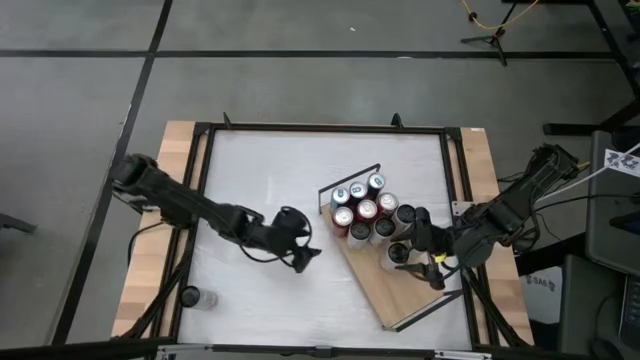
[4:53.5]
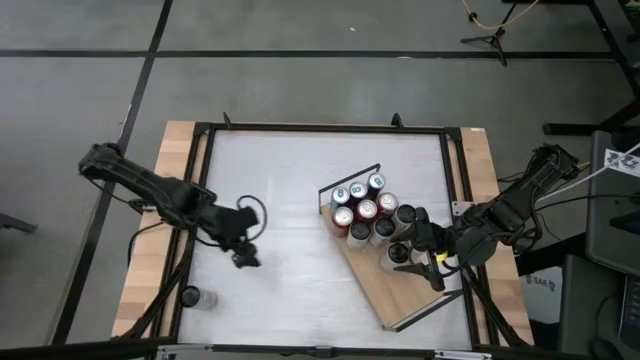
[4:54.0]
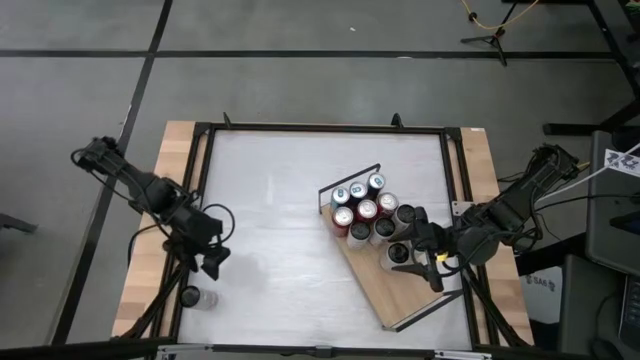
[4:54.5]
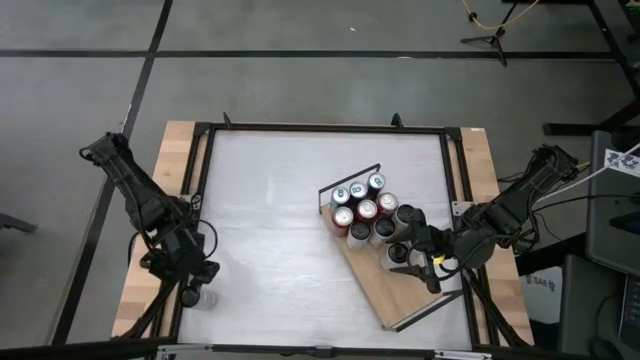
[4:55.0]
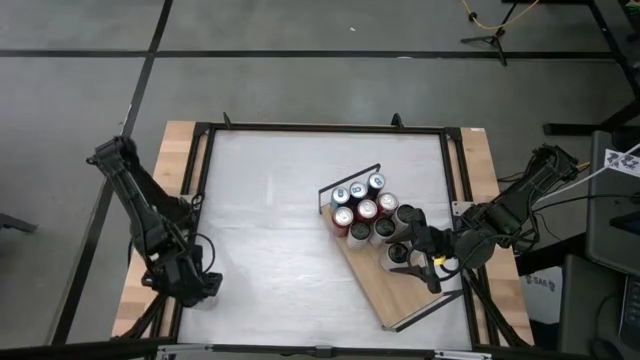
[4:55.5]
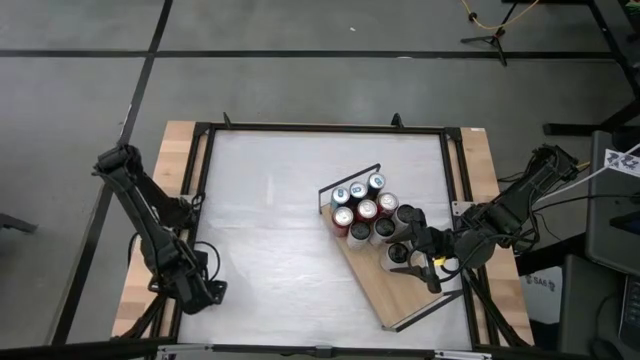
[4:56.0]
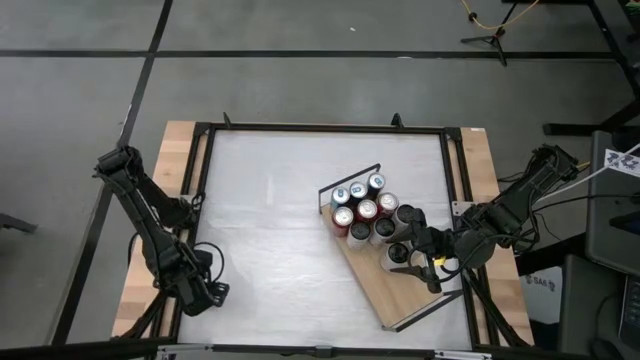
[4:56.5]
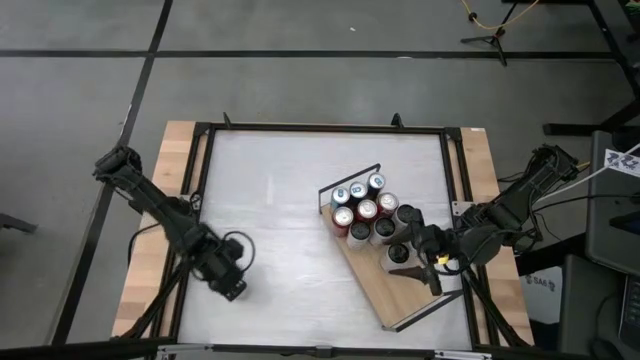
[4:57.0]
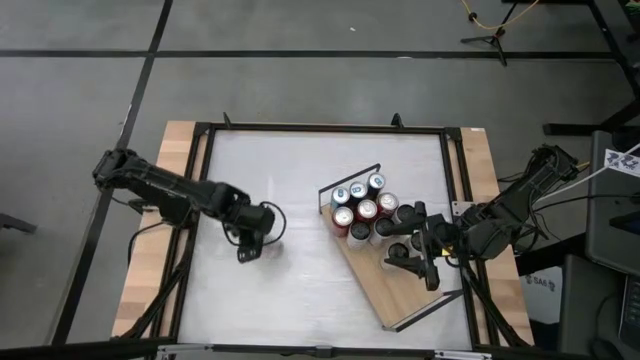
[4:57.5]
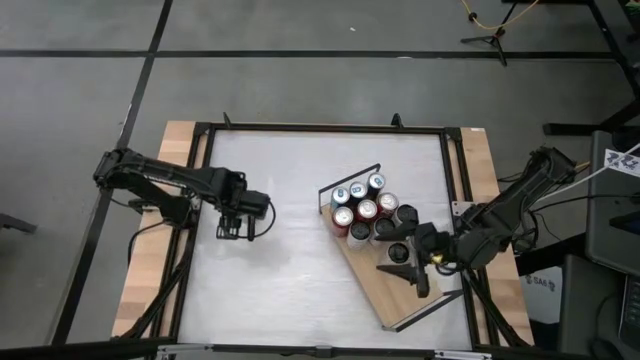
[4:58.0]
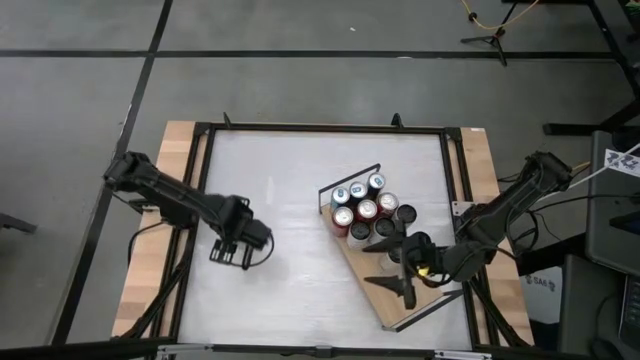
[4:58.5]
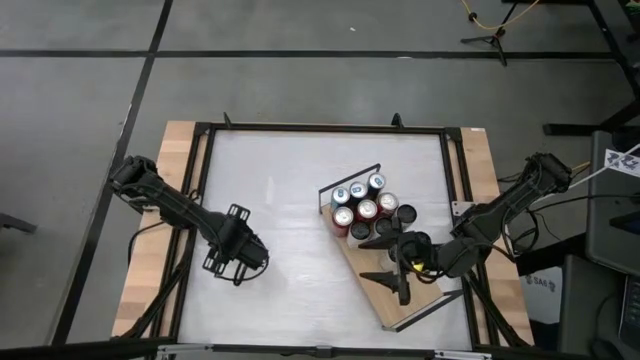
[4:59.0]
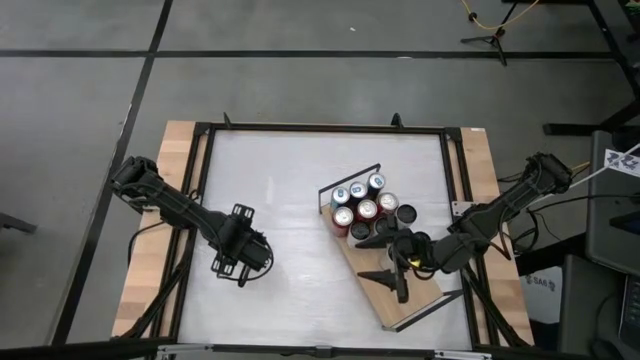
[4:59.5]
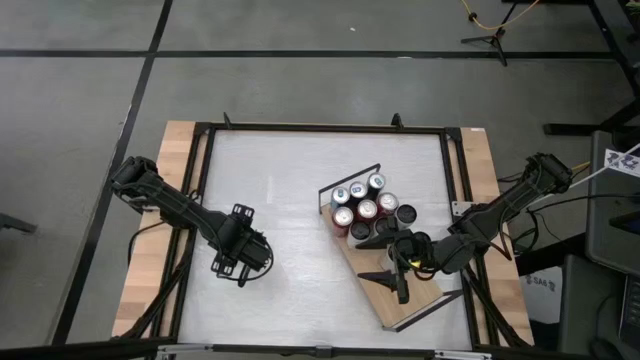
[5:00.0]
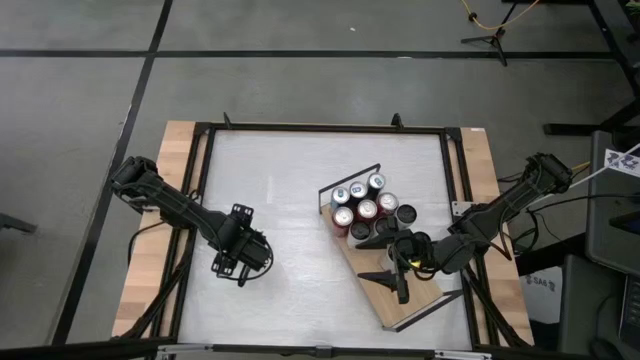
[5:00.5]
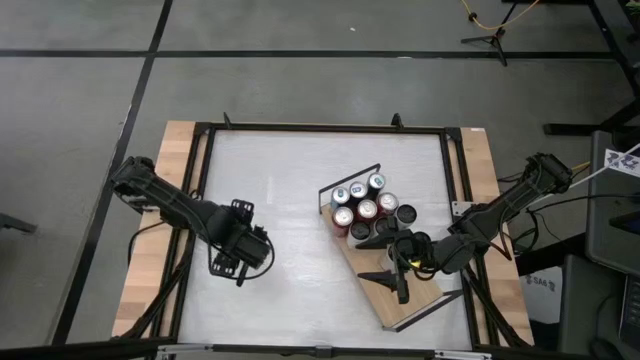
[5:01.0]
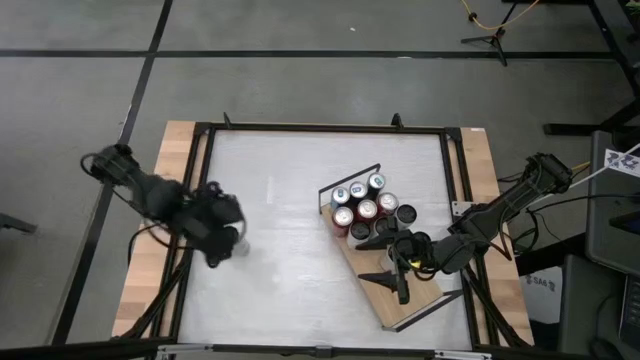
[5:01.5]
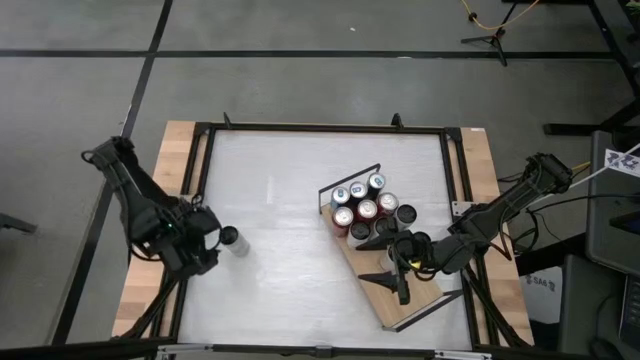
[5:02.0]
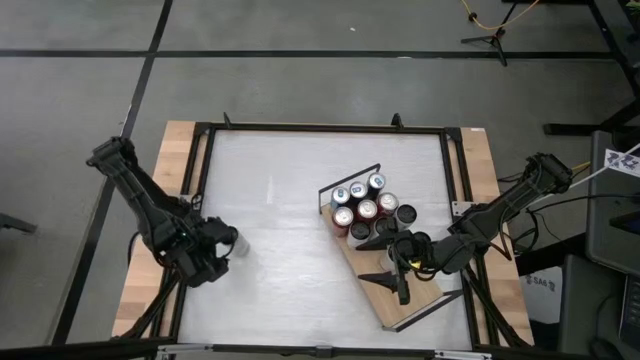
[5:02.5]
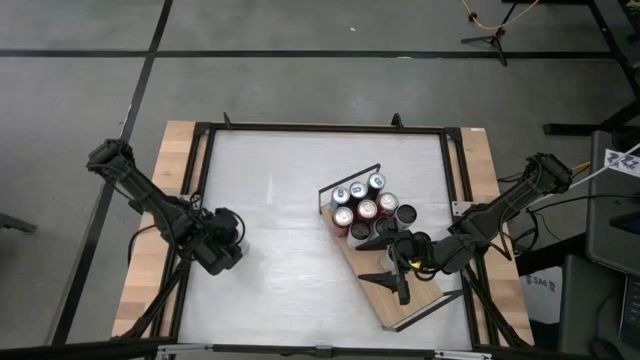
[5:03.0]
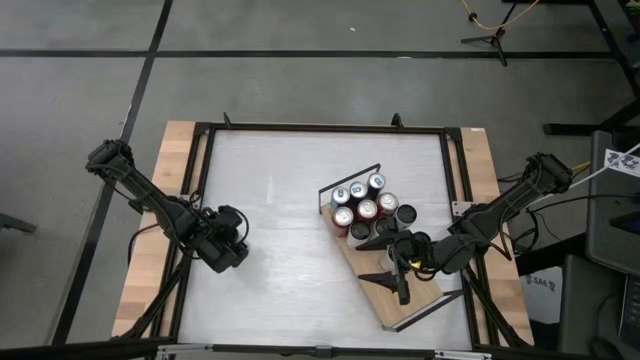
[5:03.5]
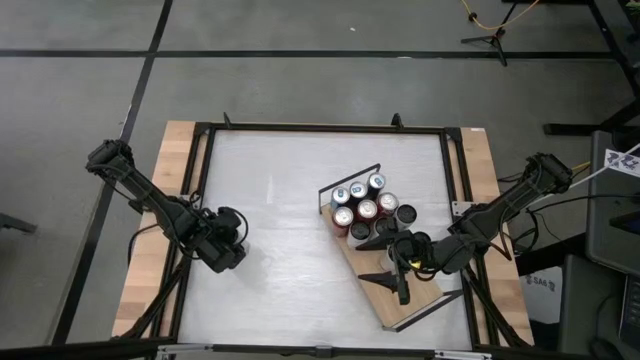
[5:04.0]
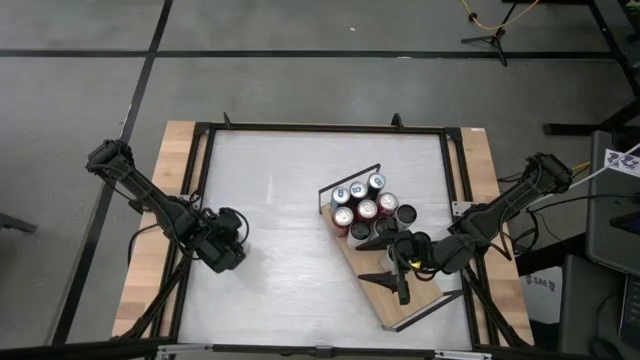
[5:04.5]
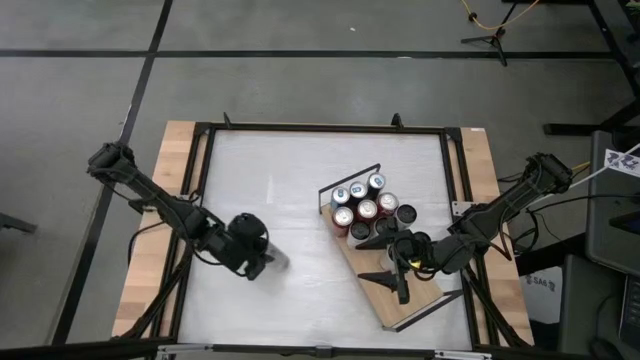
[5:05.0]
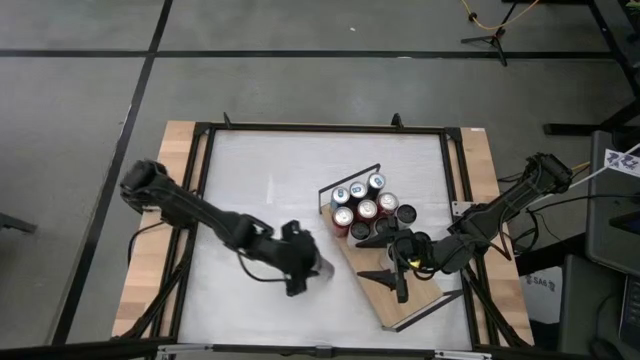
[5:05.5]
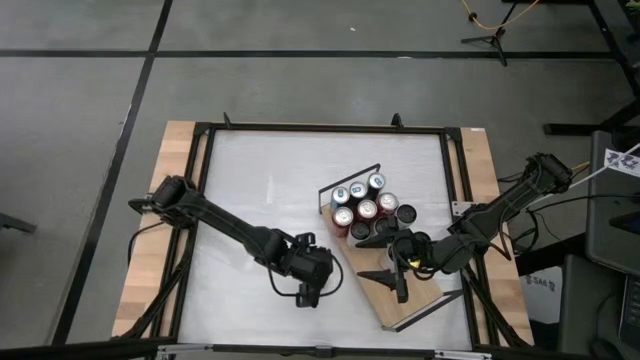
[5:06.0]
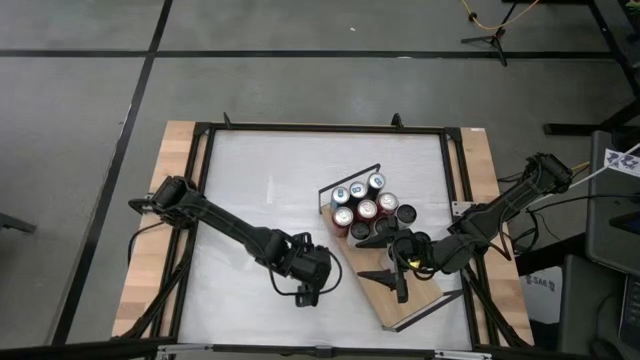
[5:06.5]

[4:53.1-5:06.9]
Task: Place canned beverage on shelf
Put the white pink soda can on the shelf aligned with the other white pink soda cans

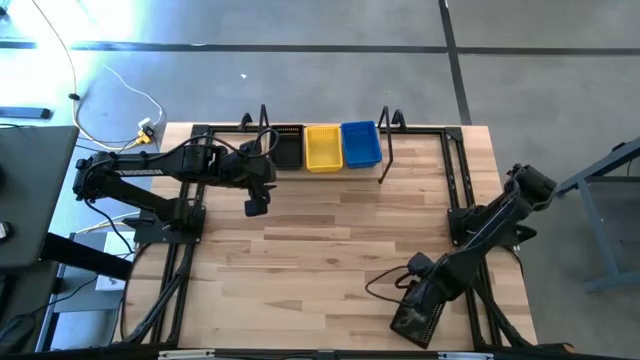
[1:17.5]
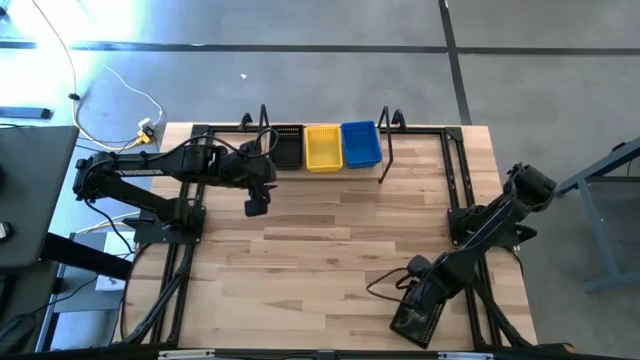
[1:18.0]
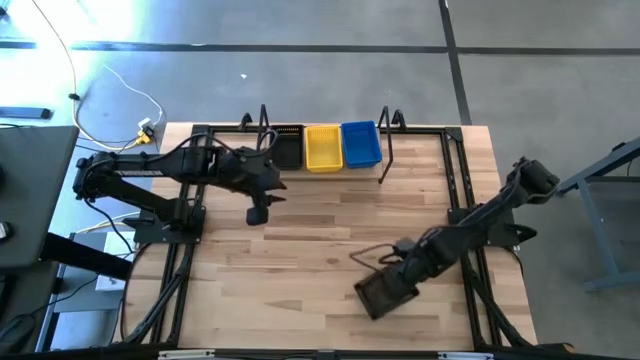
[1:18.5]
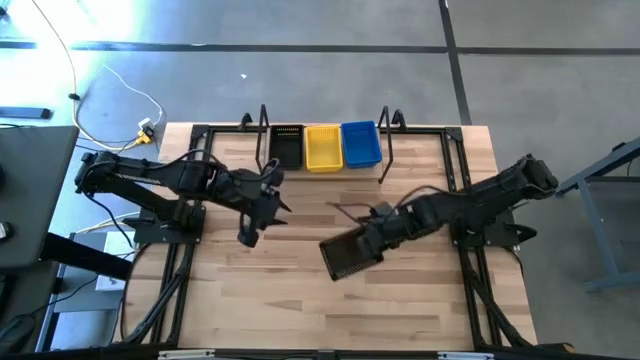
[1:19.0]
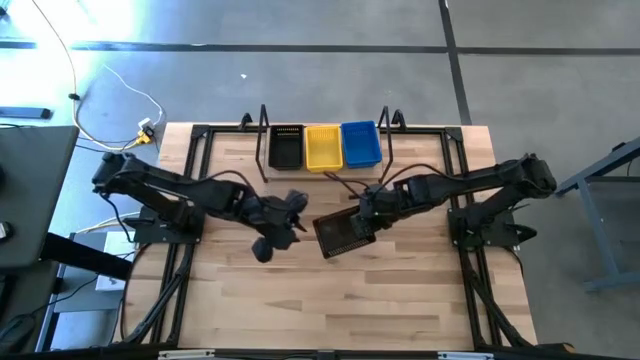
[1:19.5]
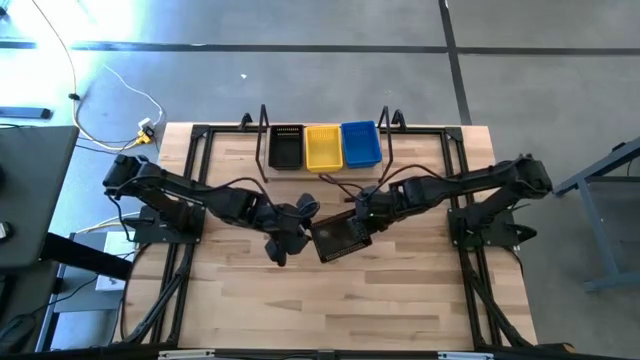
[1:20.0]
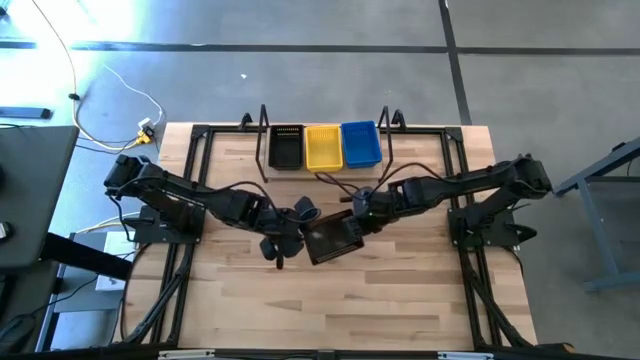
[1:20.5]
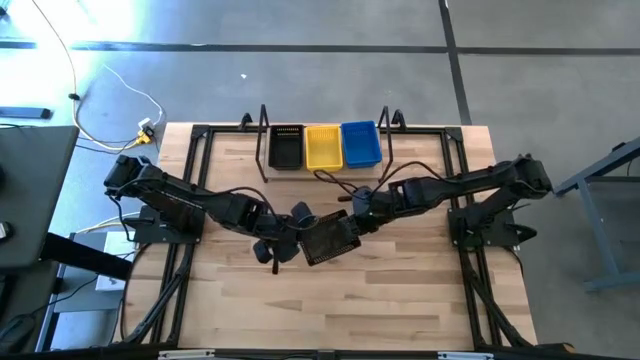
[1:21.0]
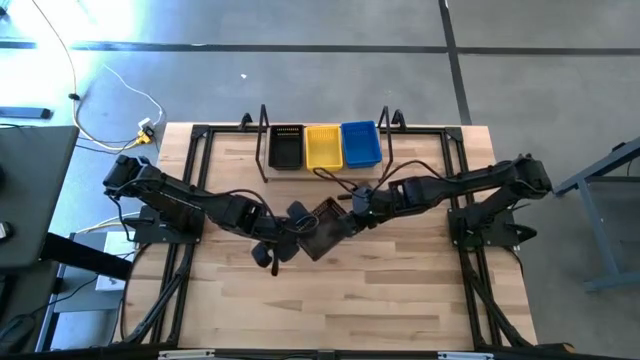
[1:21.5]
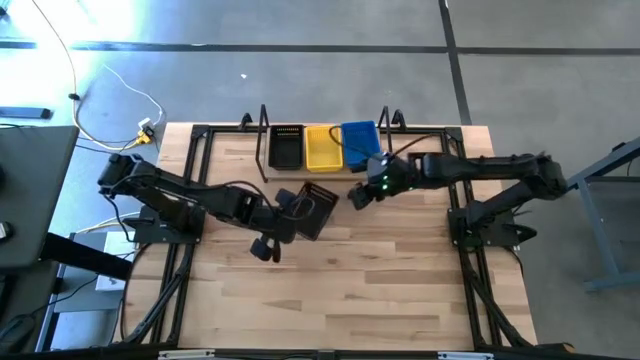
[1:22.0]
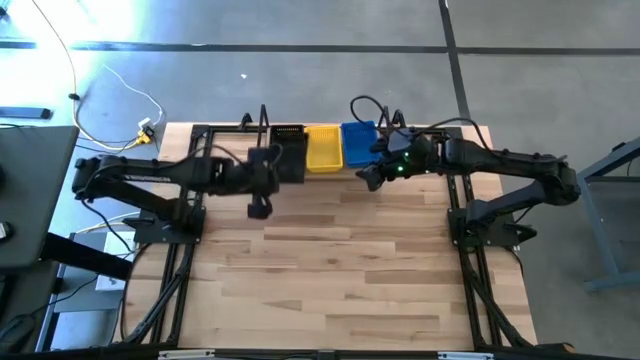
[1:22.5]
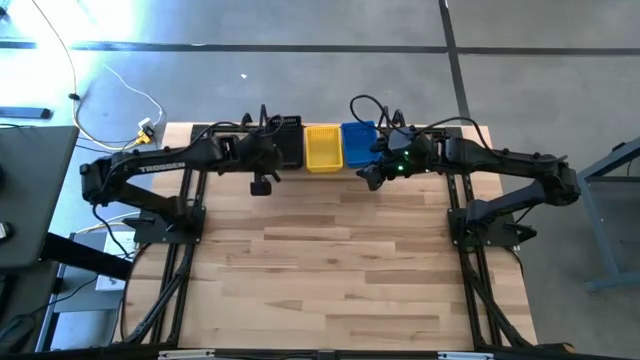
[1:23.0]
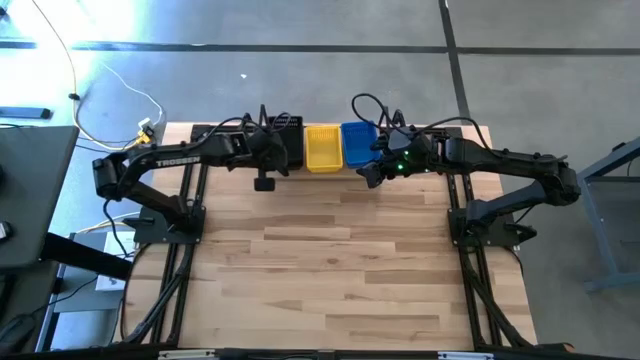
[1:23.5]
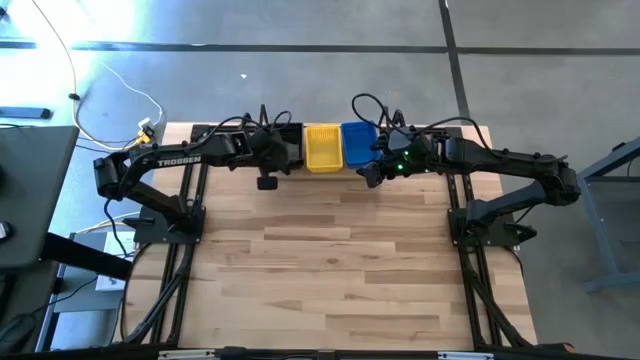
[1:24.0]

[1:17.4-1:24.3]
Task: Stack baskets on shelf by color
Stack the black bin on top of the blue bin on the shelf
